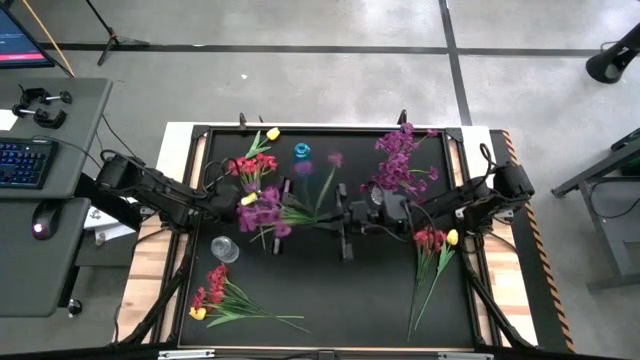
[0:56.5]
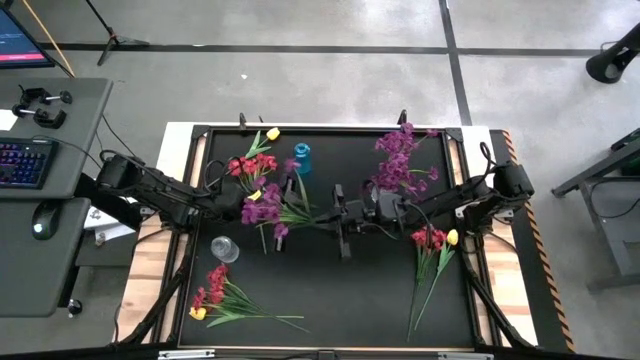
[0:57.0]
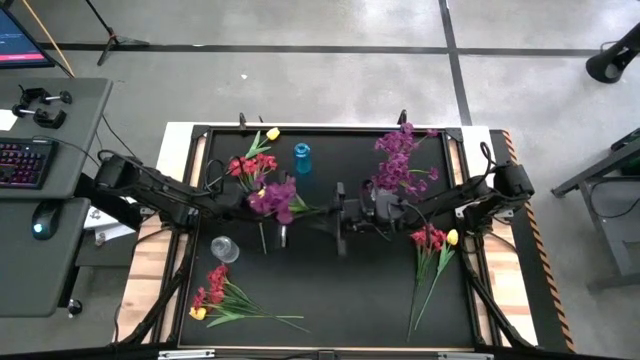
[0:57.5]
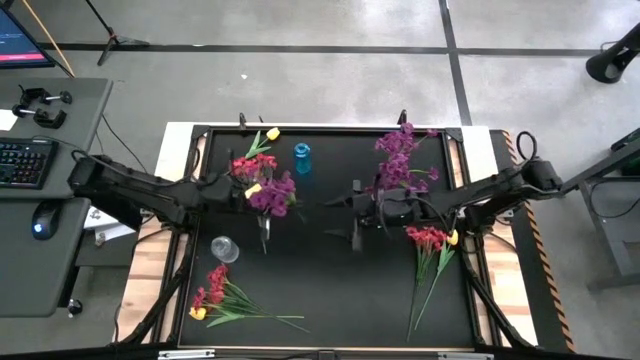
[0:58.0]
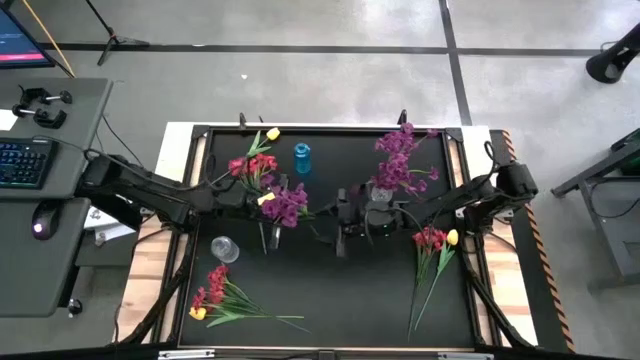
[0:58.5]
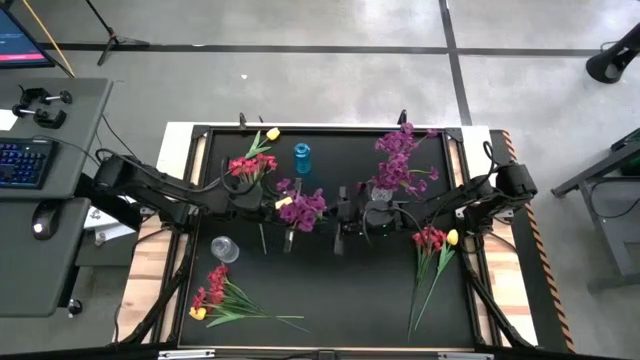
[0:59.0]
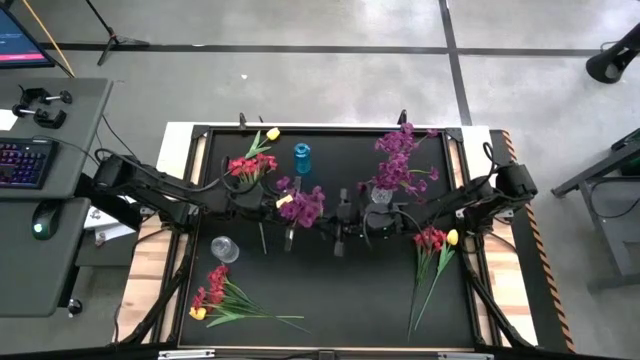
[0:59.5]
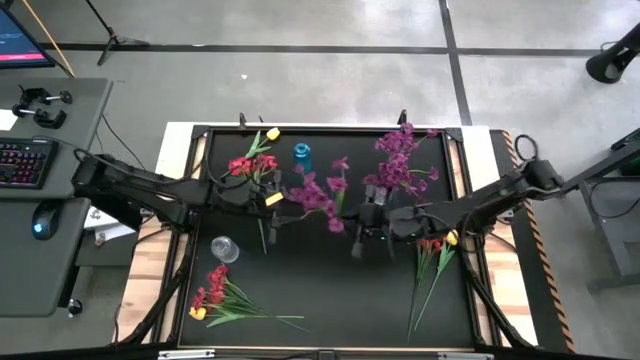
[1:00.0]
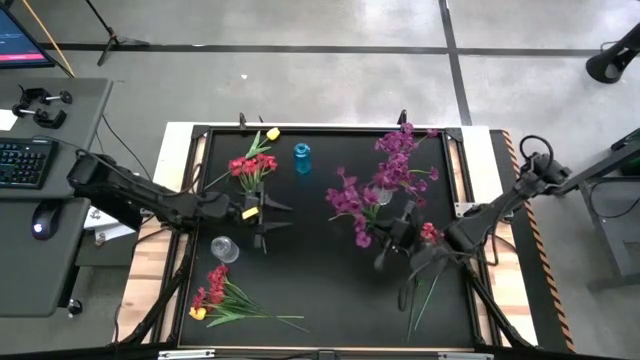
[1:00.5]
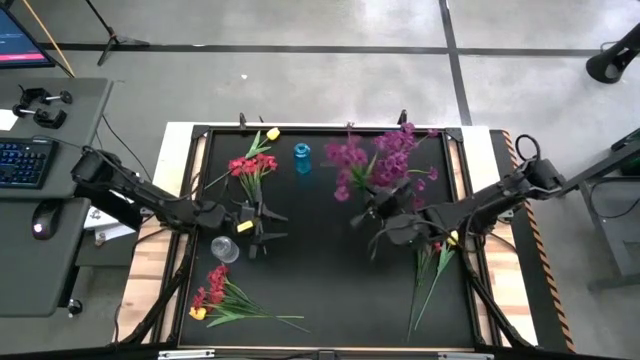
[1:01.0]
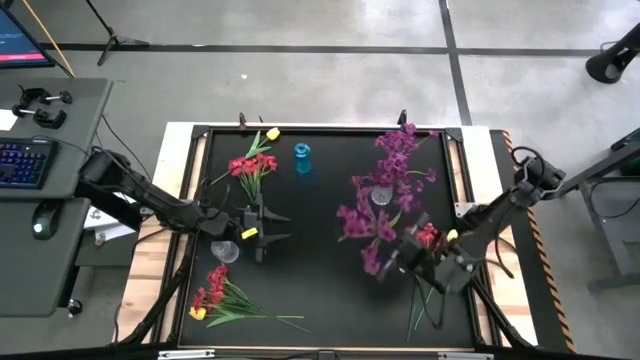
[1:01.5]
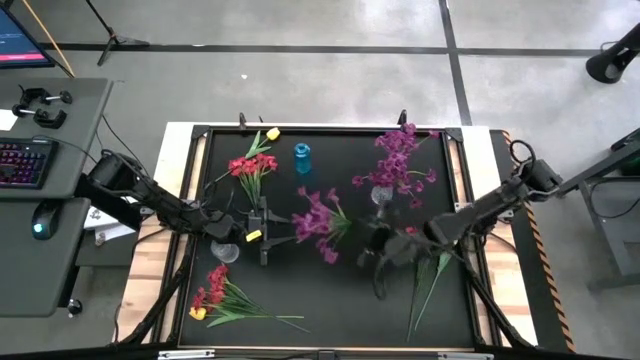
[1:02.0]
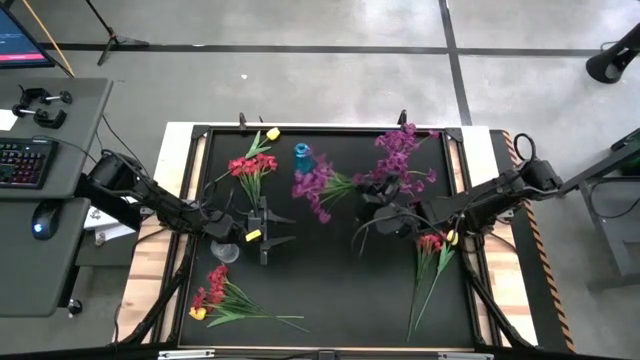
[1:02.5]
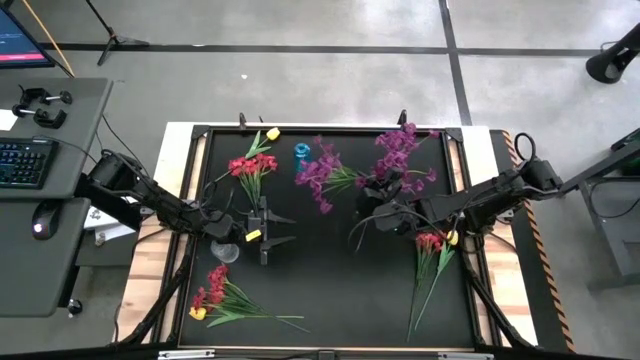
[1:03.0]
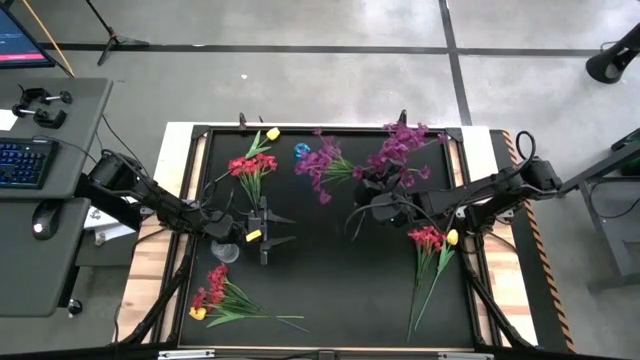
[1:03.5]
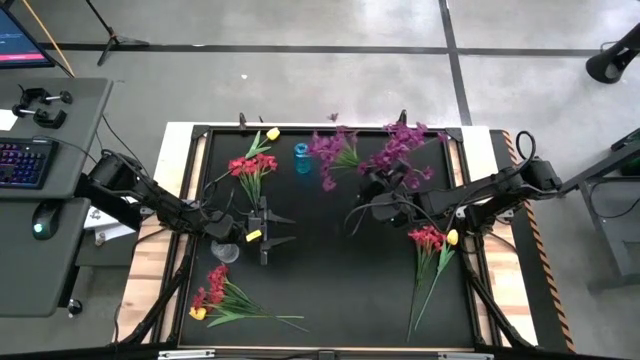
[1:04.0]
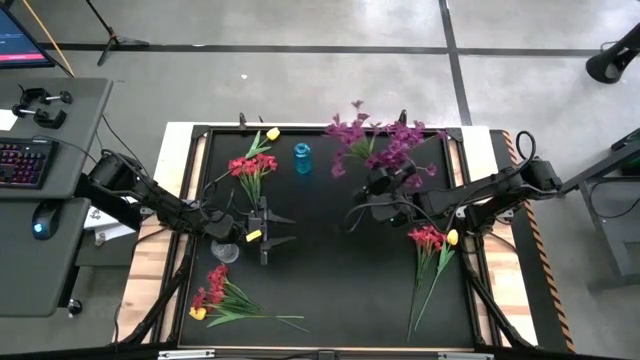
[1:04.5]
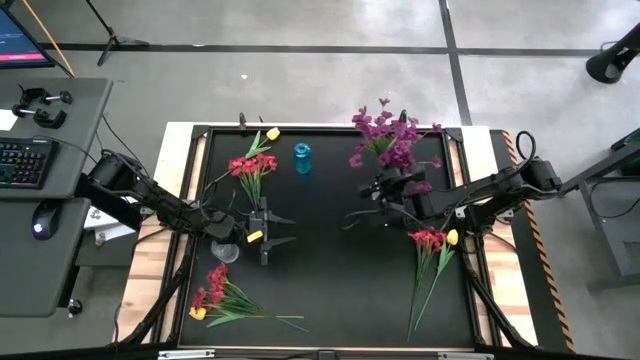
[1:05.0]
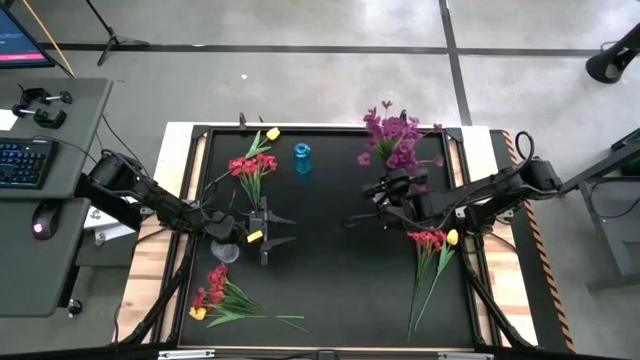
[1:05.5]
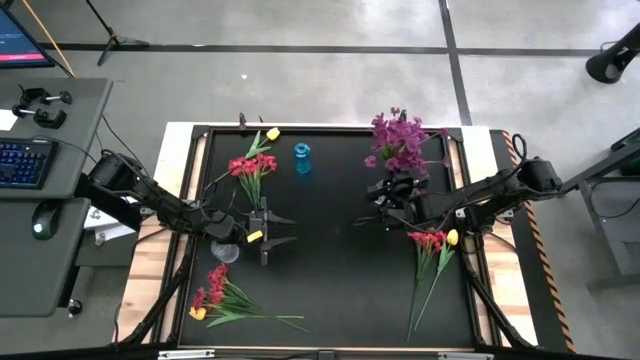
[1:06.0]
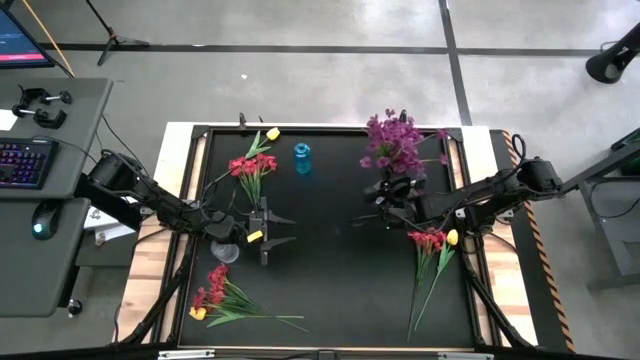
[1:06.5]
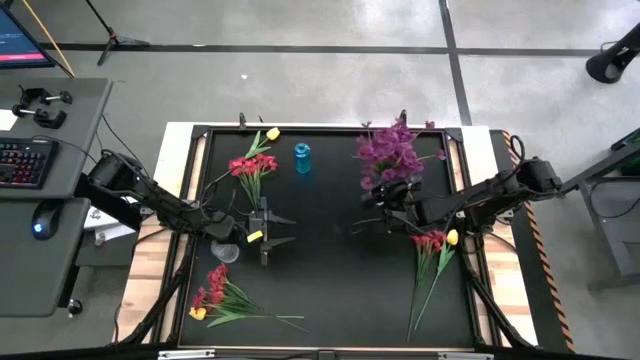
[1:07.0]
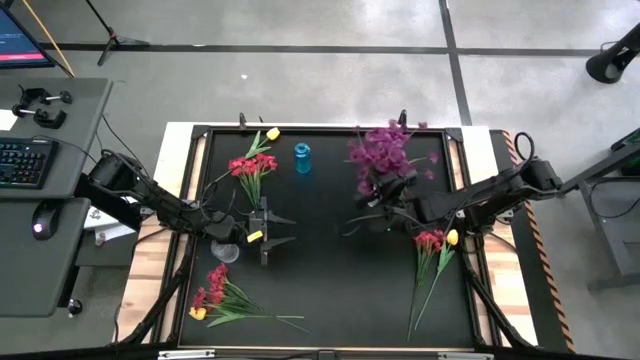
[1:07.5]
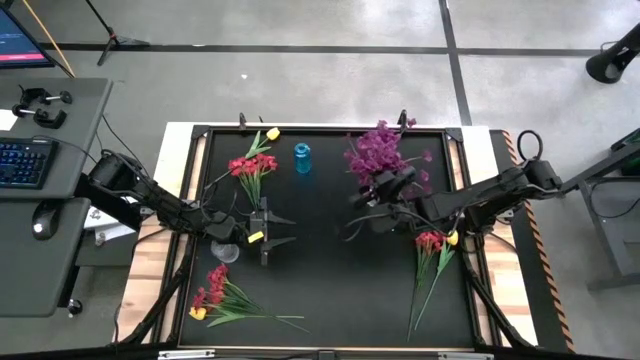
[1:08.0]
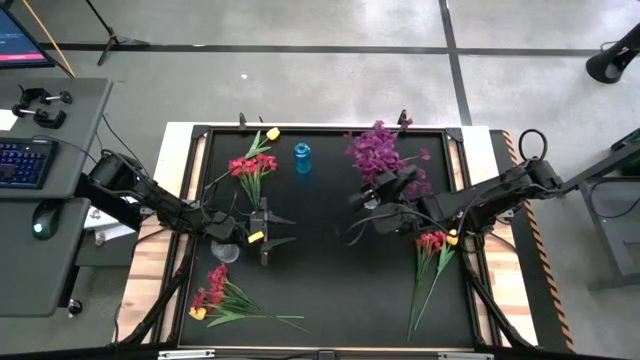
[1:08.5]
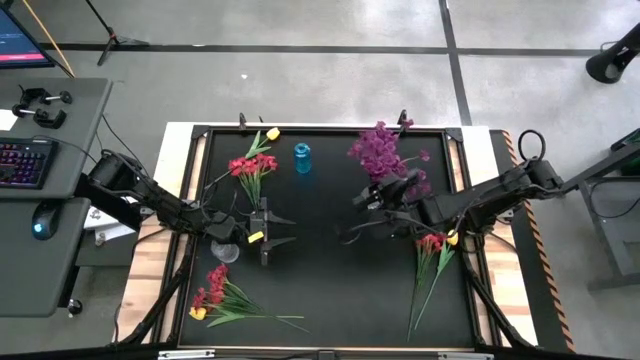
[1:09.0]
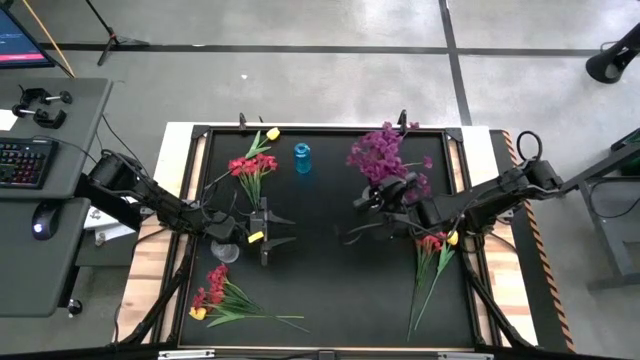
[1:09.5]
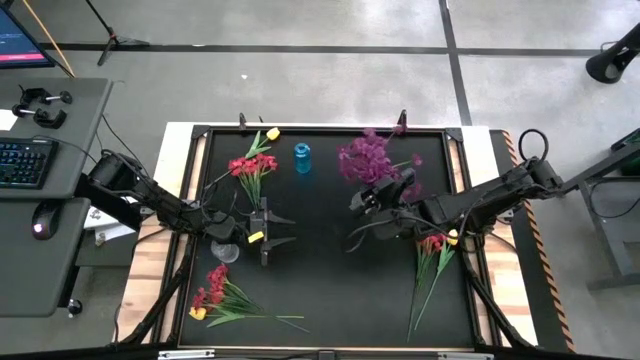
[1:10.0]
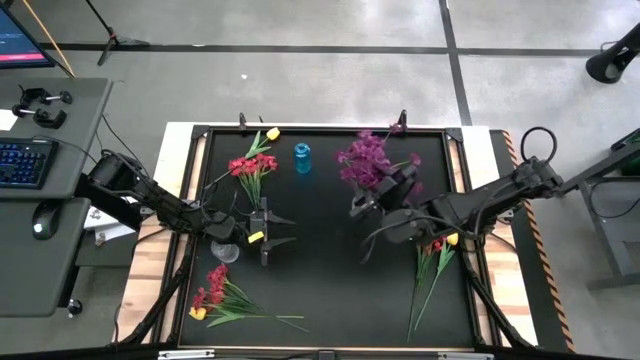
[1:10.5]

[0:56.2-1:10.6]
Task: Sort flowers into vase by color
Put the violet flowers into the right transparent vase

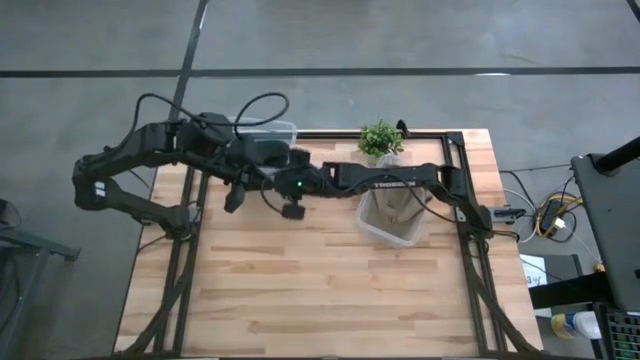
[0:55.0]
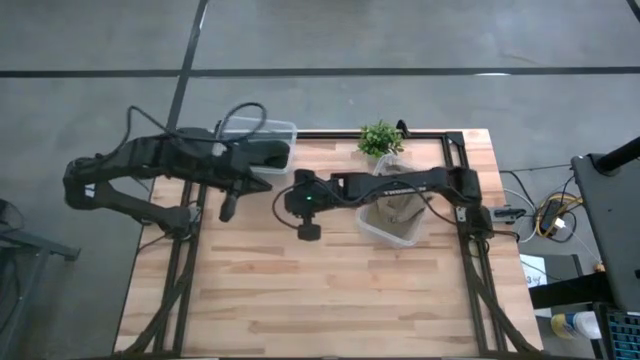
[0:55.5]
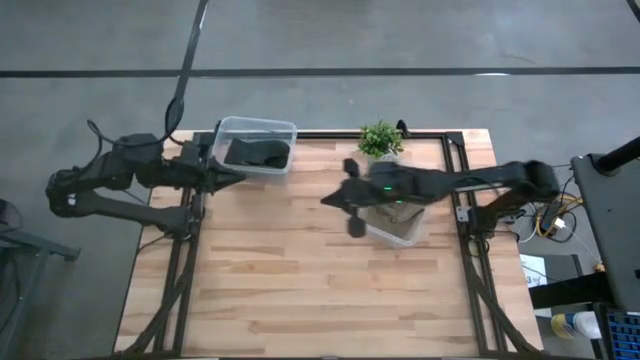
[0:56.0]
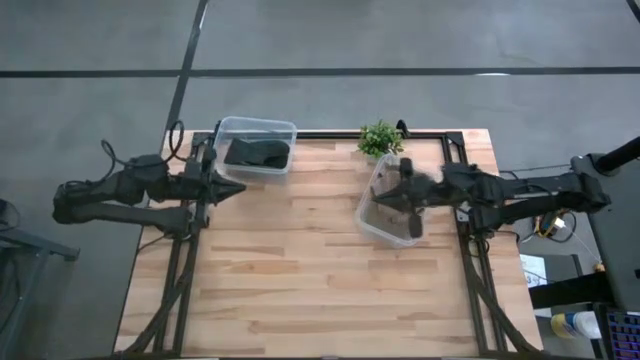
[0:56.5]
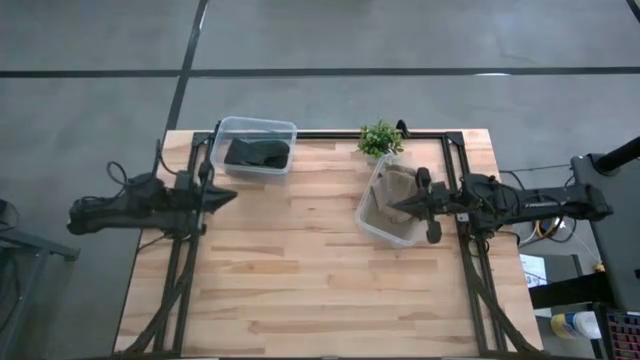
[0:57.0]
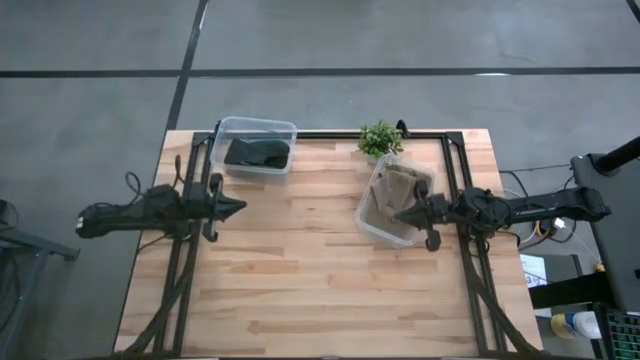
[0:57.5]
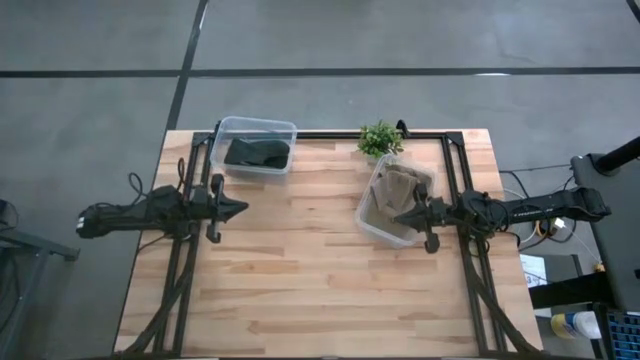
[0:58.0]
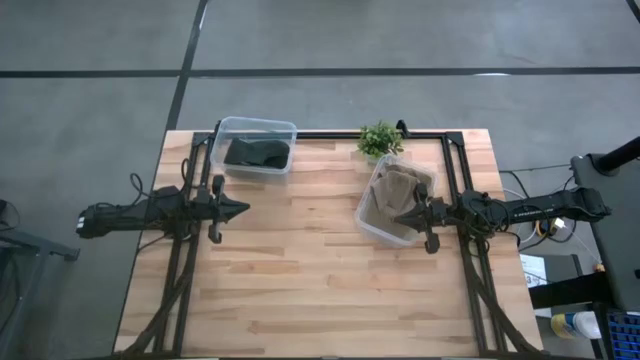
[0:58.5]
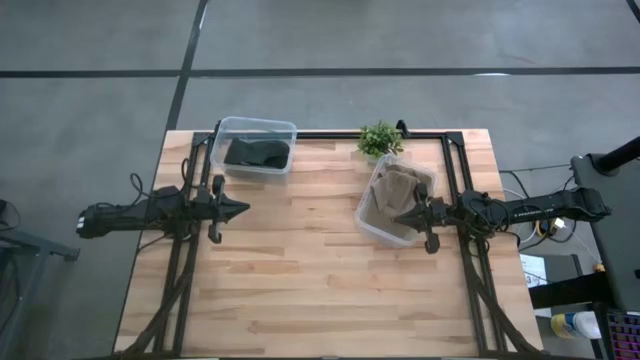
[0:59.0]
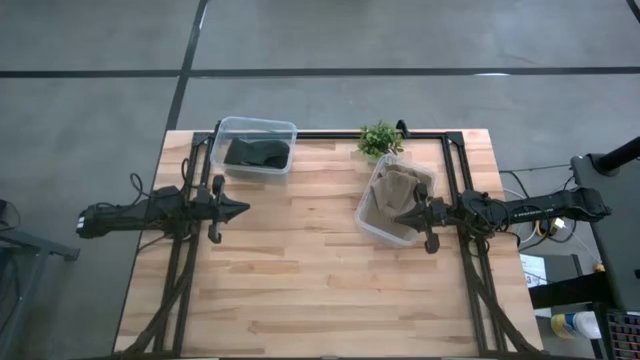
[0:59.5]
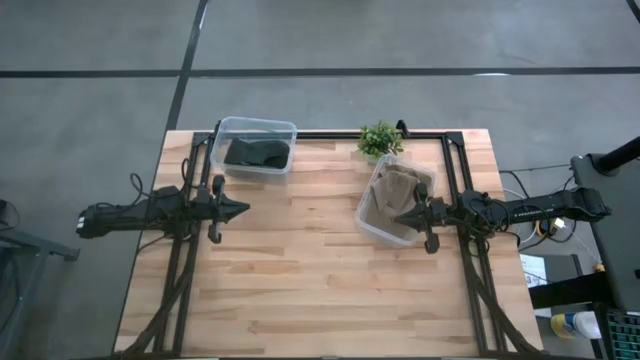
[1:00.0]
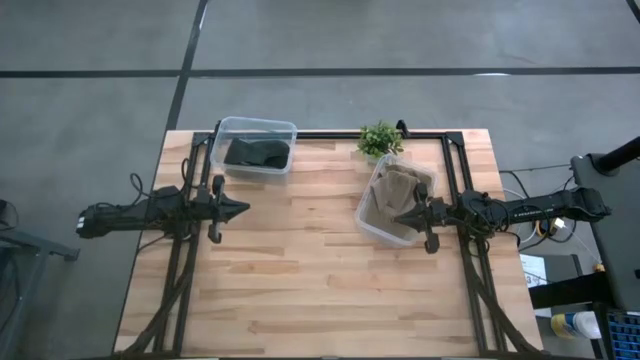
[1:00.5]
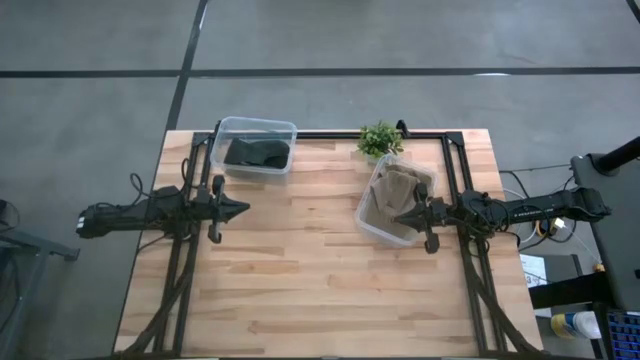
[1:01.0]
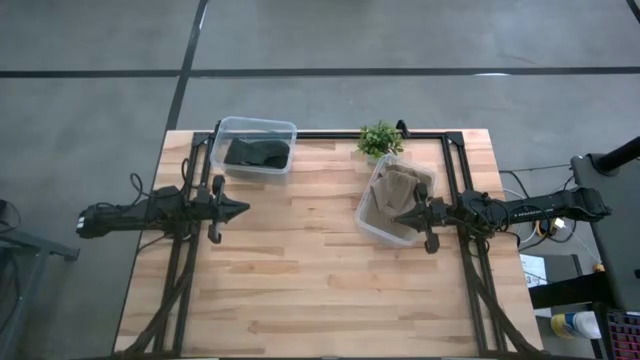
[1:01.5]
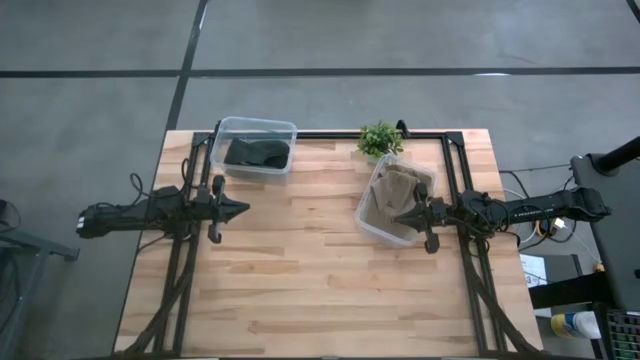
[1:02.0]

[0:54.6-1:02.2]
Task: Pick & Place hat
Return to Home Position
